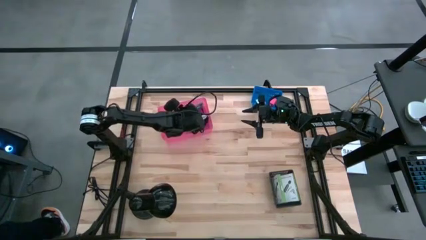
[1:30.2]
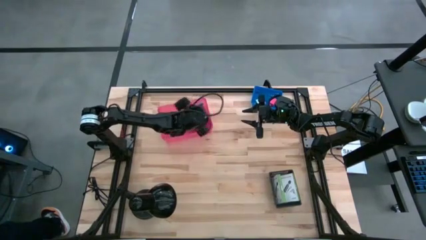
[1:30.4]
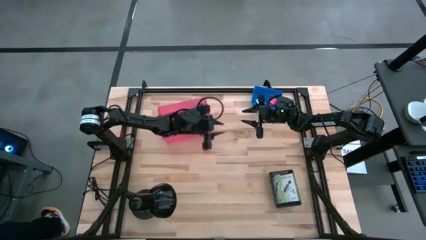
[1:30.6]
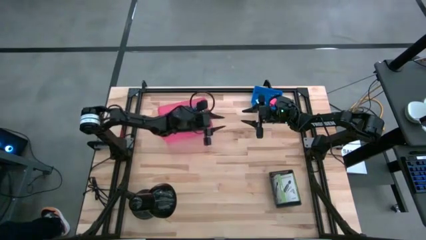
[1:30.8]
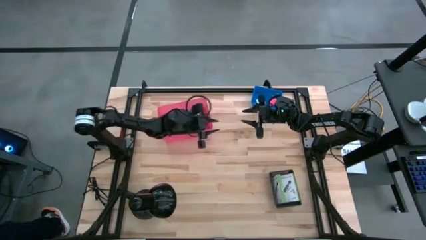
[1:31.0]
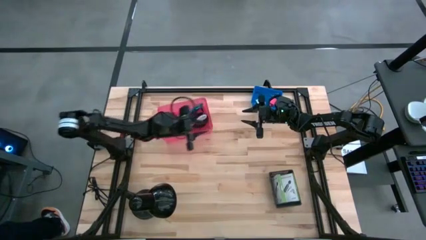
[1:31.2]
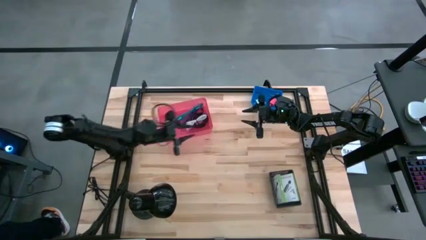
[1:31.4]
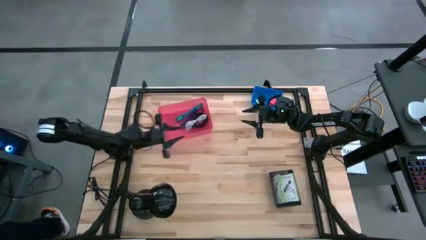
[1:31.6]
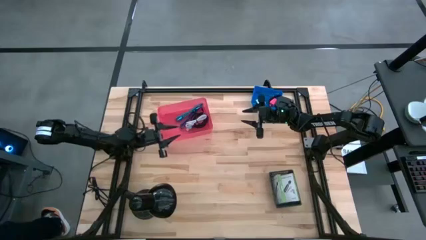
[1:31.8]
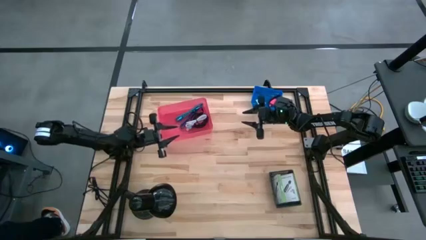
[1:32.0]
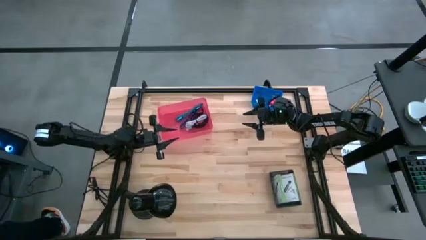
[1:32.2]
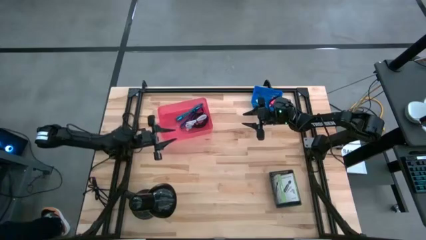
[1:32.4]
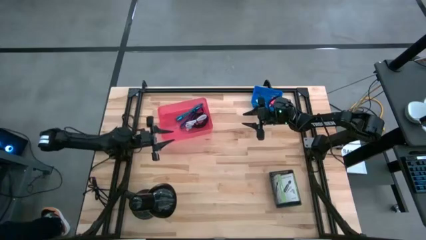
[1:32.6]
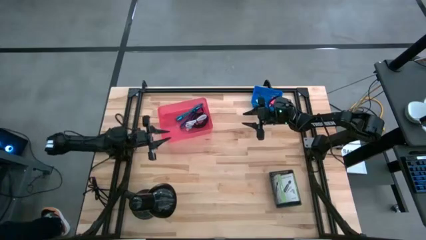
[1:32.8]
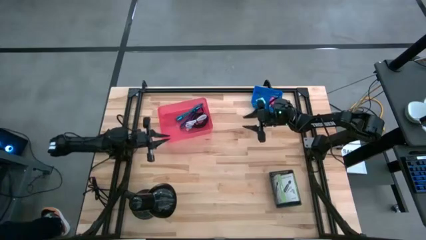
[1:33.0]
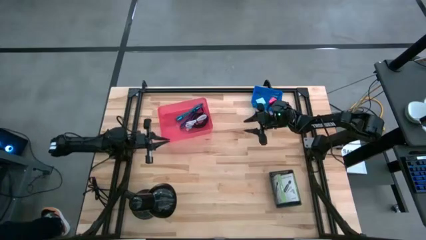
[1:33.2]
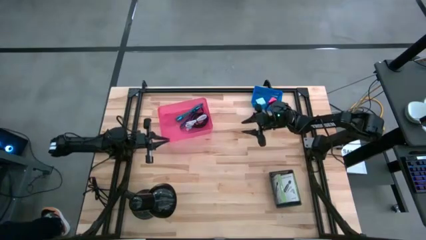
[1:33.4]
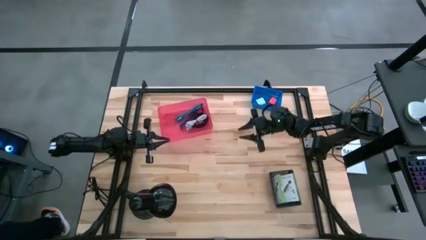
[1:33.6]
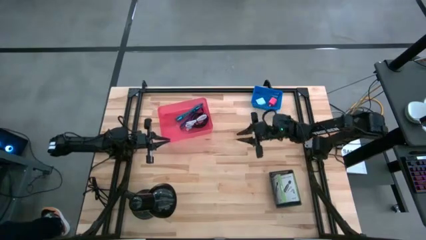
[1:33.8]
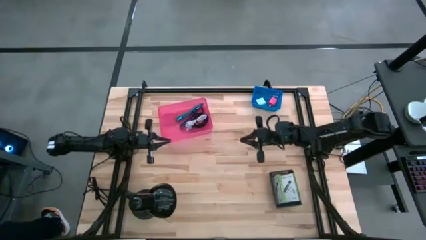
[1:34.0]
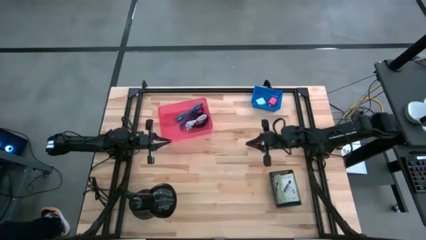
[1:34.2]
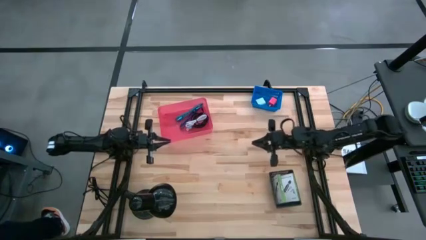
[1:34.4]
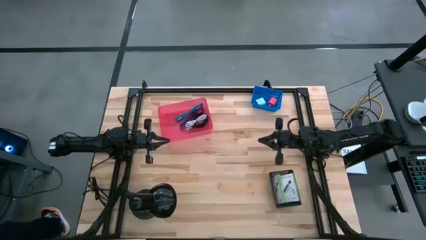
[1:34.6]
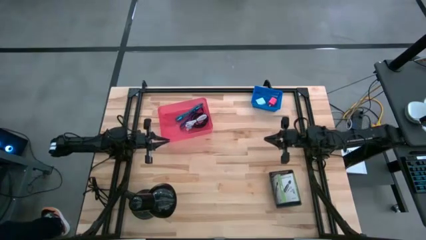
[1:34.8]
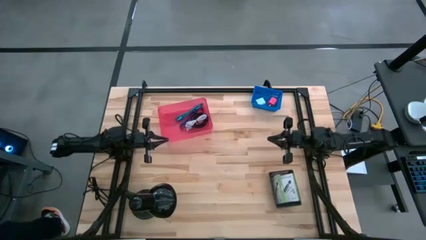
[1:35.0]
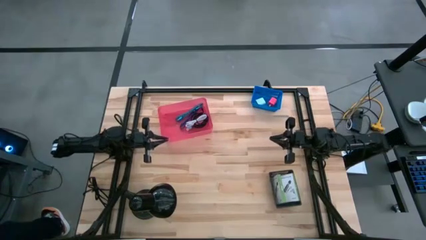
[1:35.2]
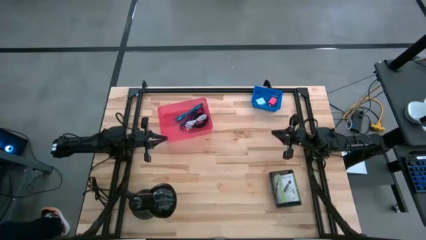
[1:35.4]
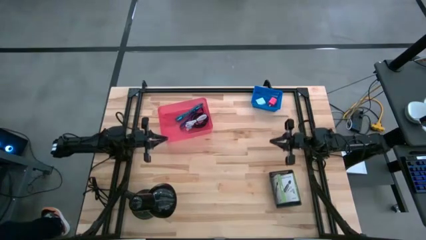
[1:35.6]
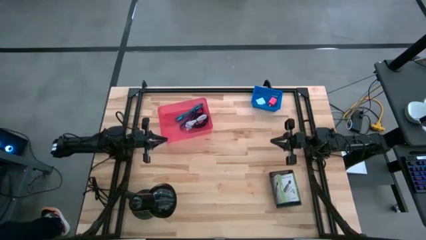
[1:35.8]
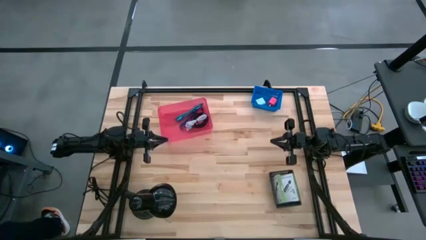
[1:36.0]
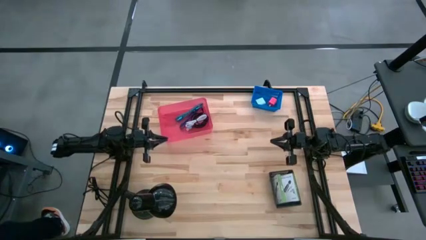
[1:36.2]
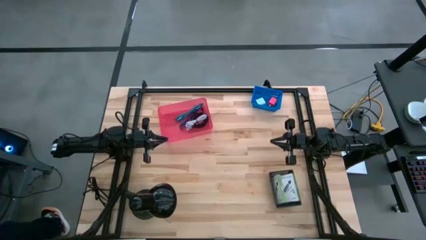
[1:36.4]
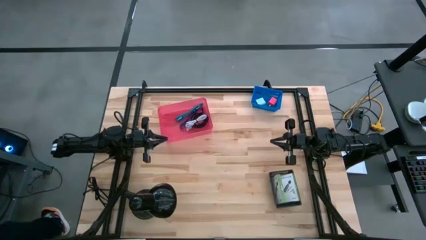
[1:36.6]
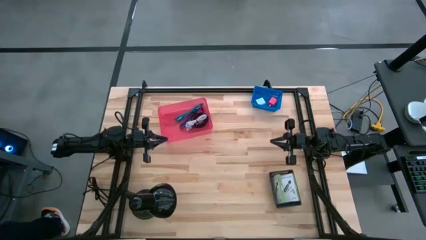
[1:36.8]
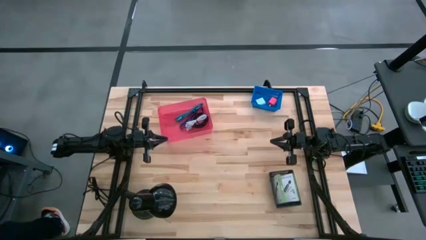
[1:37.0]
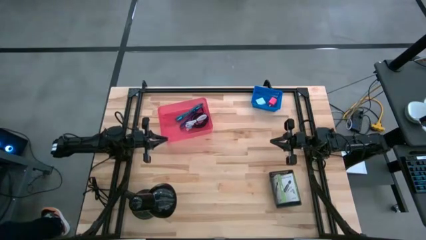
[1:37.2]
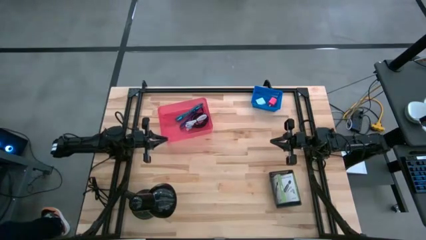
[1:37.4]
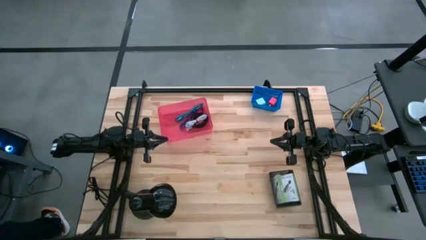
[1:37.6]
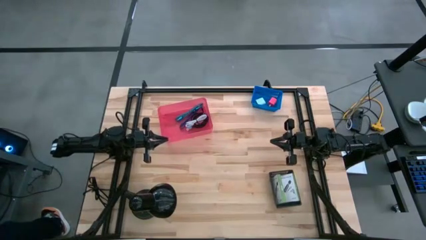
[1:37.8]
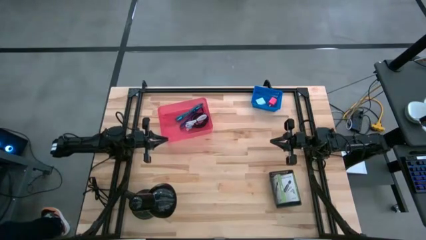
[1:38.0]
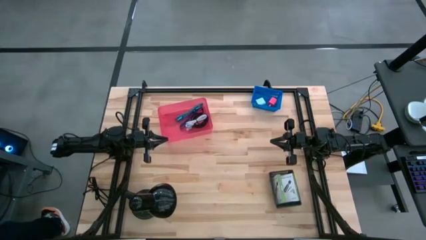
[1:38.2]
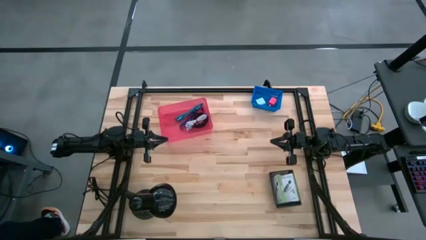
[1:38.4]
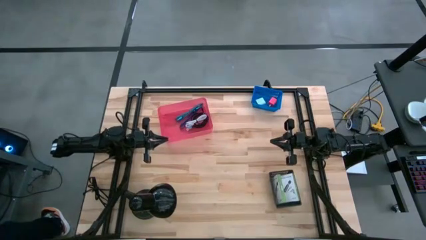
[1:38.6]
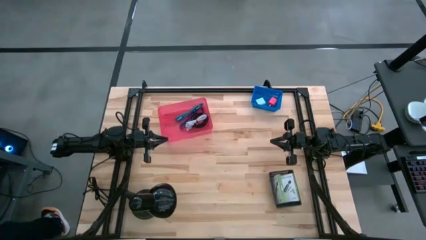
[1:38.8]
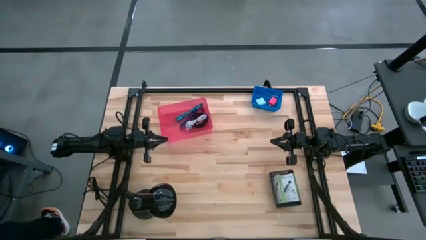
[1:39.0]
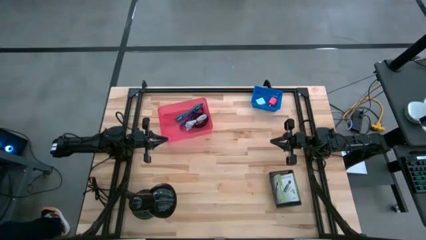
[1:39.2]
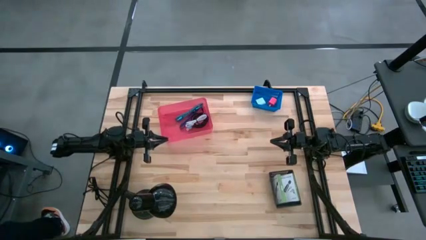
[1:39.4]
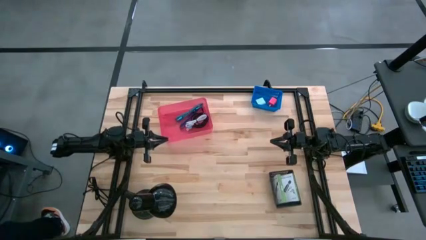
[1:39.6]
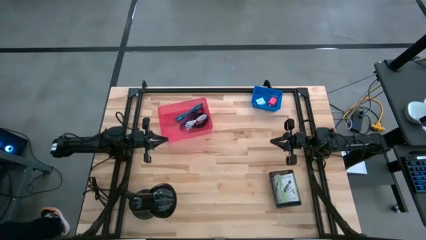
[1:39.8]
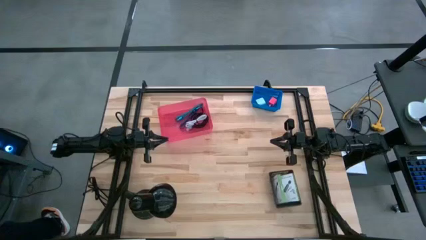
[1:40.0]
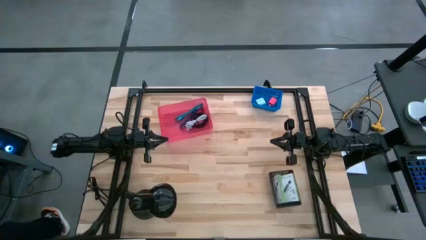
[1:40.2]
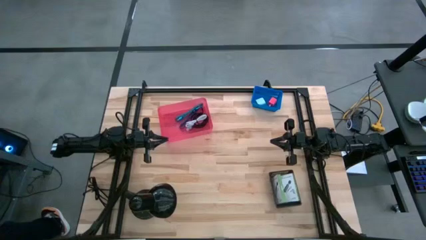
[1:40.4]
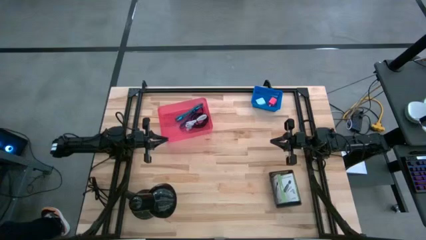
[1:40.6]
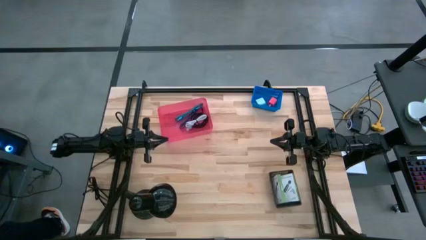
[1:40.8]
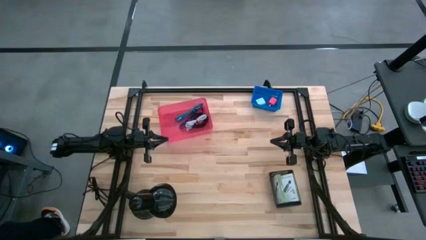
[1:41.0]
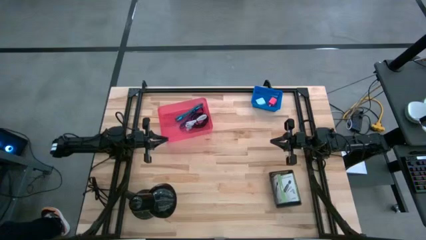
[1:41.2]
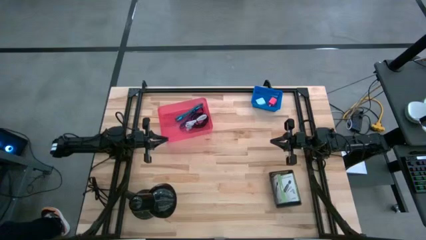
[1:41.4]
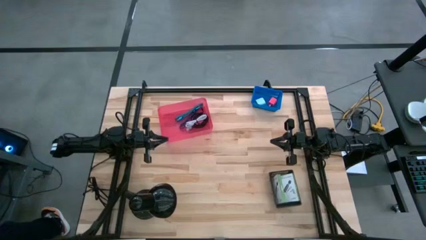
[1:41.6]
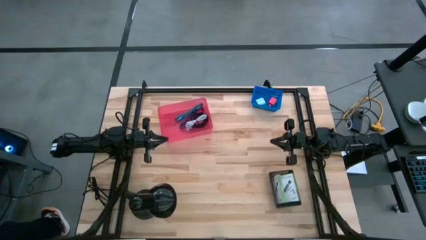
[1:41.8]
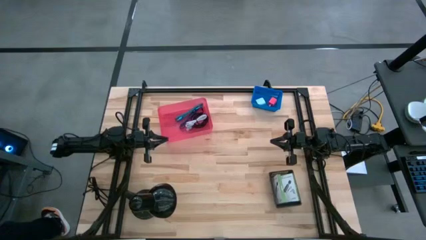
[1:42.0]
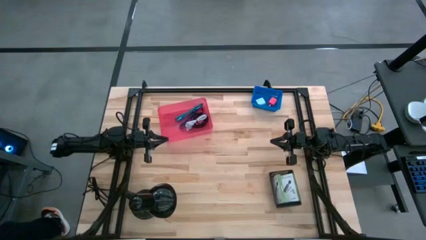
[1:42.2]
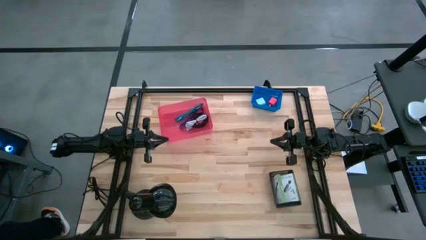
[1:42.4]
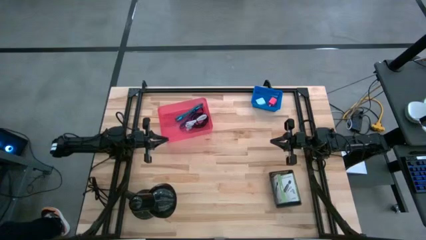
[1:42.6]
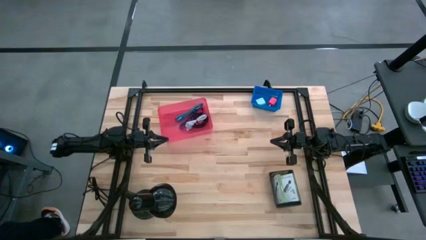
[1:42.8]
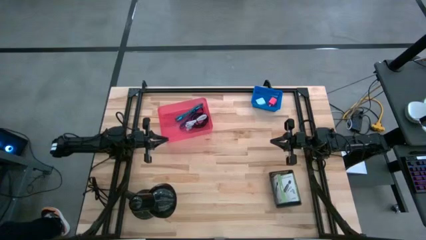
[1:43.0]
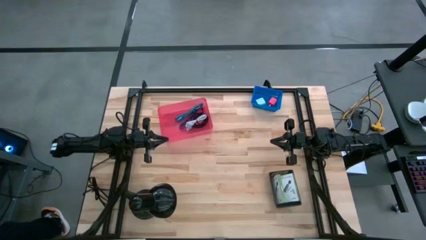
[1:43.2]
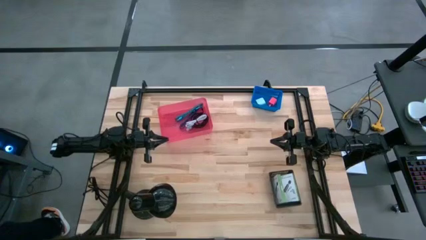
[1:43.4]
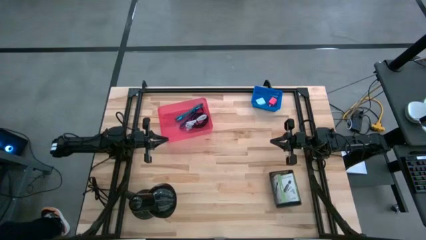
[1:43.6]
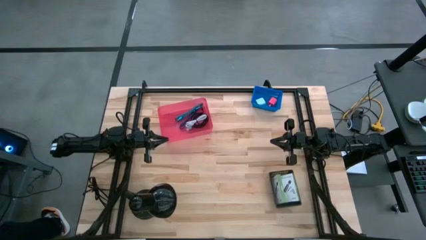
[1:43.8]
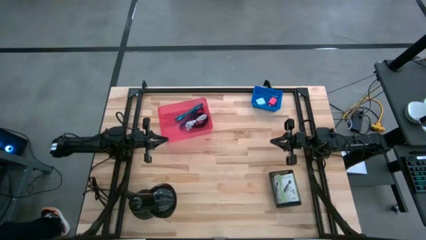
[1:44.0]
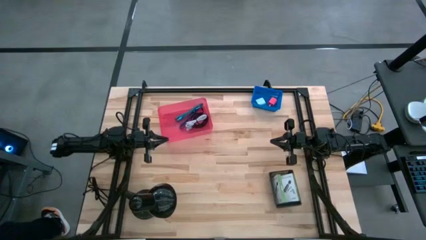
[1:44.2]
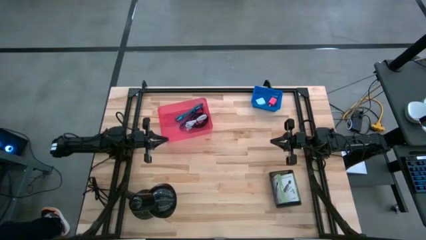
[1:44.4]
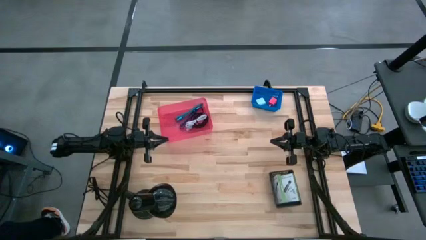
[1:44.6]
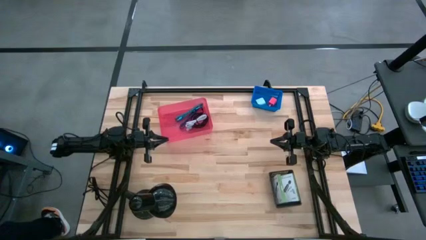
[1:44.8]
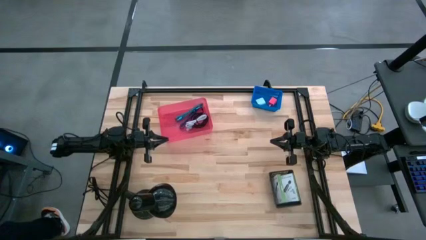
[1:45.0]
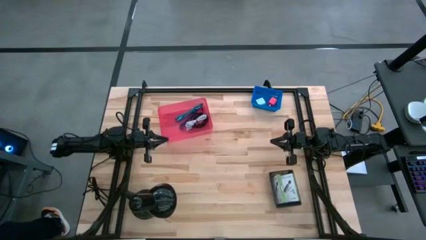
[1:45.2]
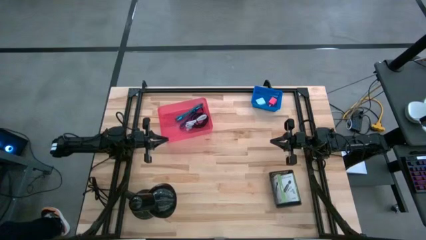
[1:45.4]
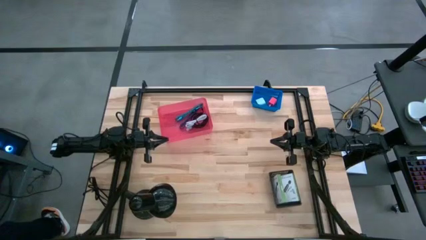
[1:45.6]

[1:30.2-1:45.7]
Task: Pick and place items into bin
Return to Home Position
